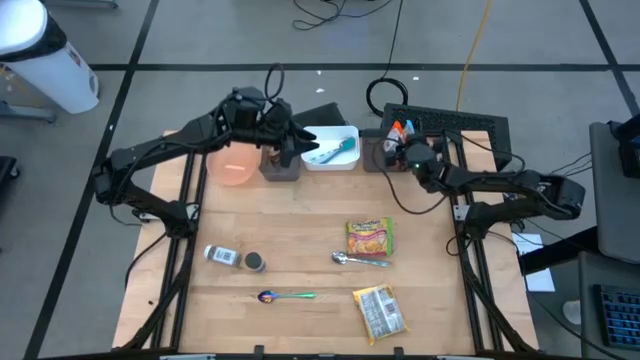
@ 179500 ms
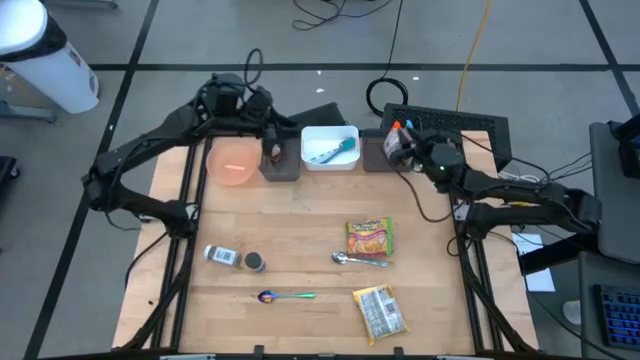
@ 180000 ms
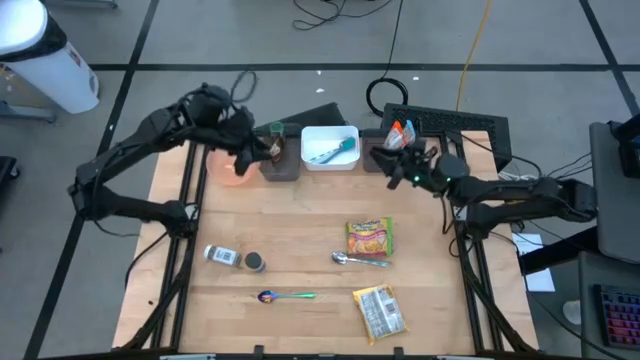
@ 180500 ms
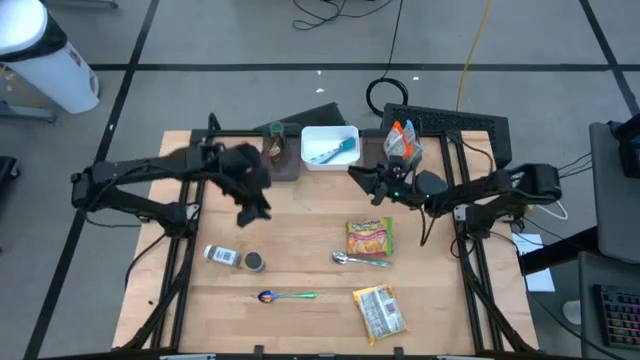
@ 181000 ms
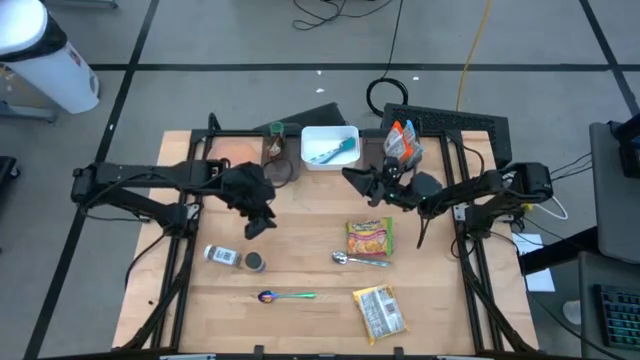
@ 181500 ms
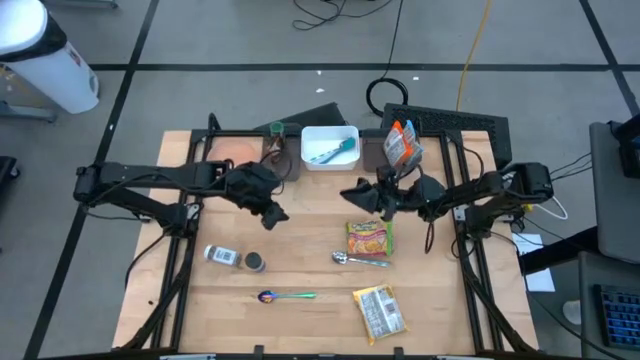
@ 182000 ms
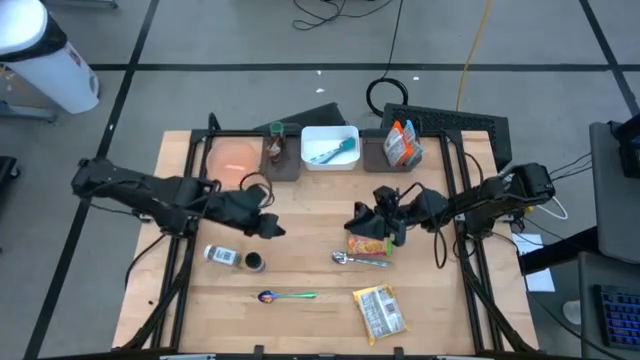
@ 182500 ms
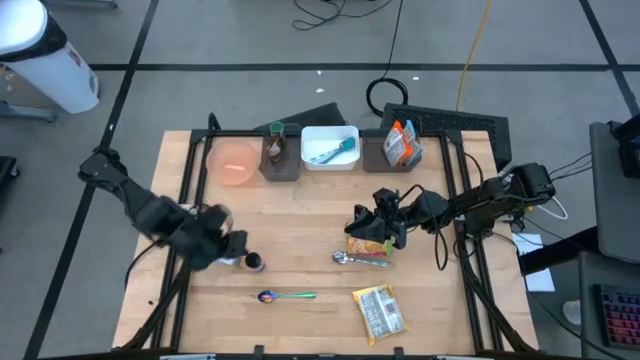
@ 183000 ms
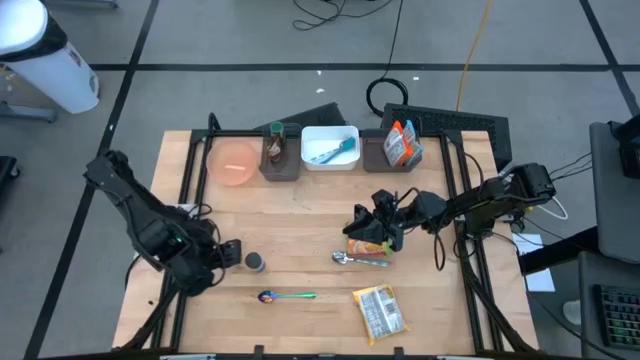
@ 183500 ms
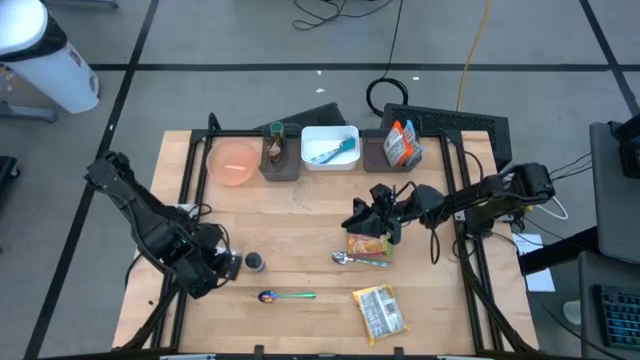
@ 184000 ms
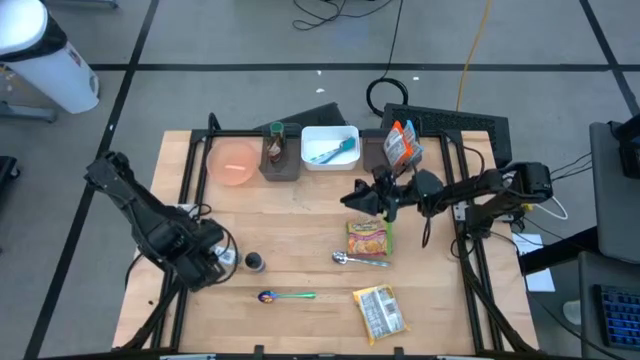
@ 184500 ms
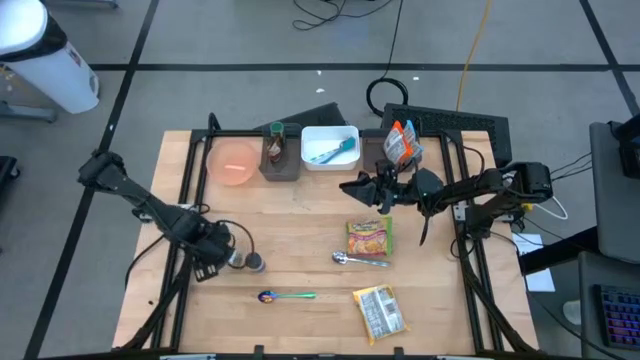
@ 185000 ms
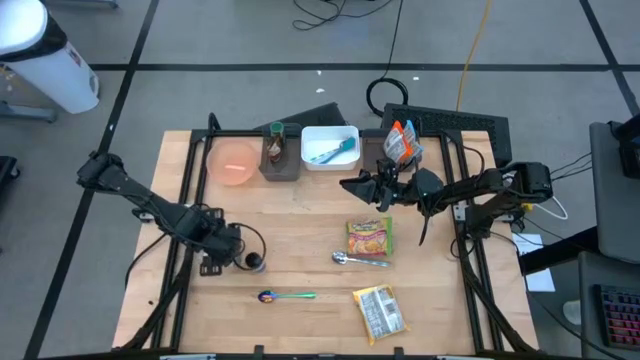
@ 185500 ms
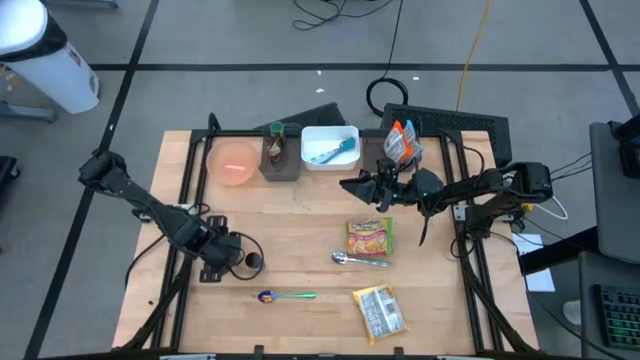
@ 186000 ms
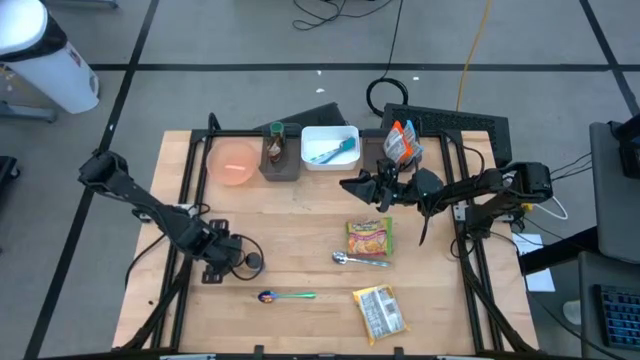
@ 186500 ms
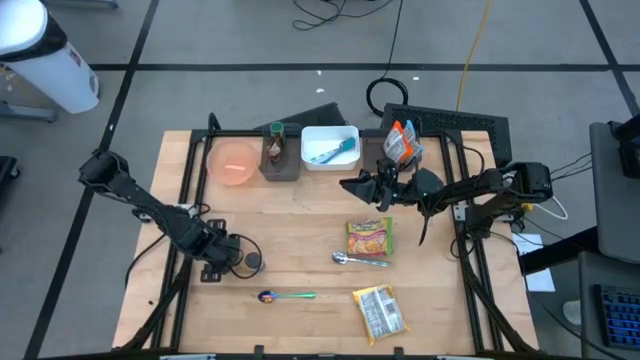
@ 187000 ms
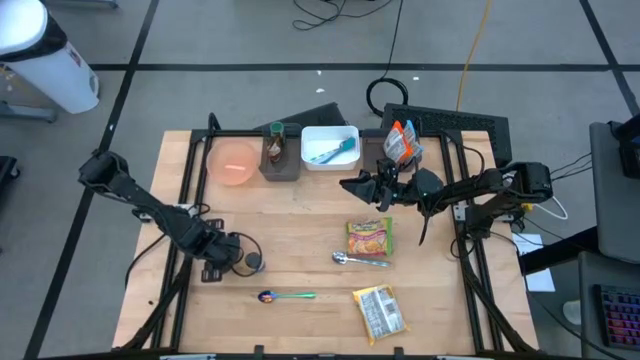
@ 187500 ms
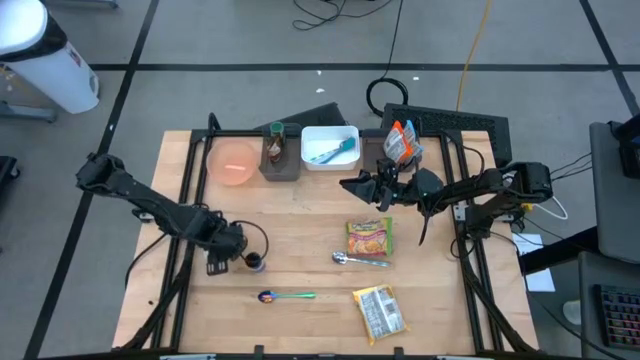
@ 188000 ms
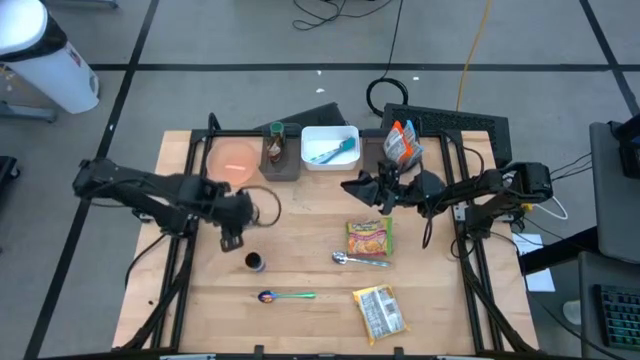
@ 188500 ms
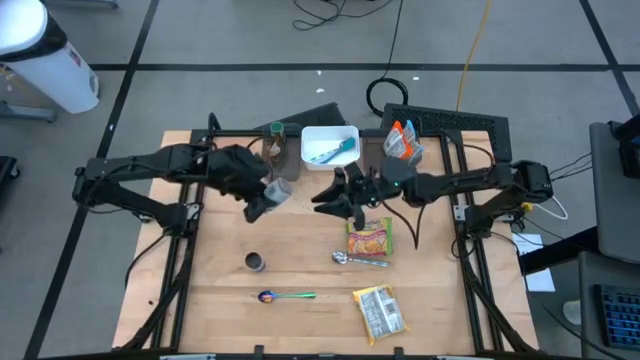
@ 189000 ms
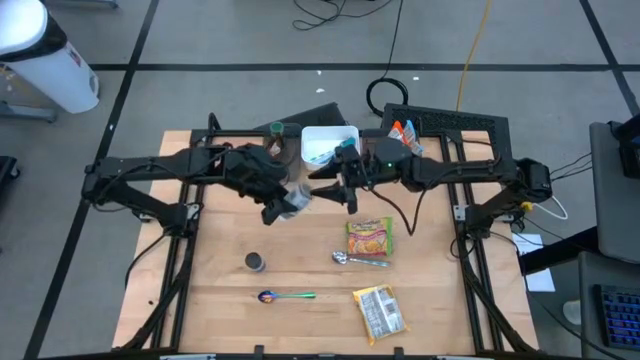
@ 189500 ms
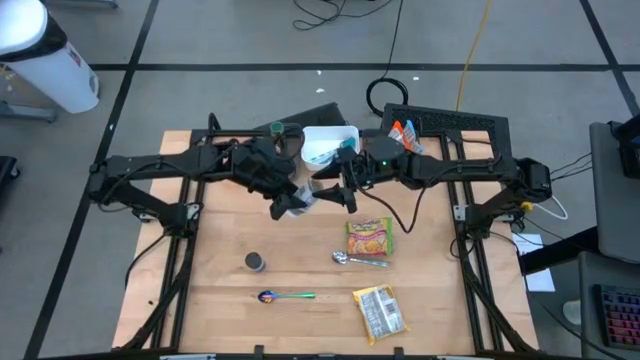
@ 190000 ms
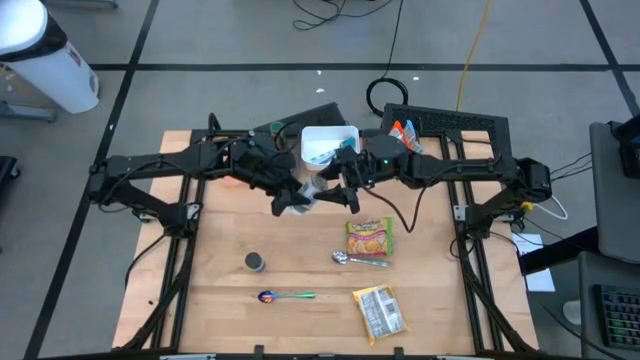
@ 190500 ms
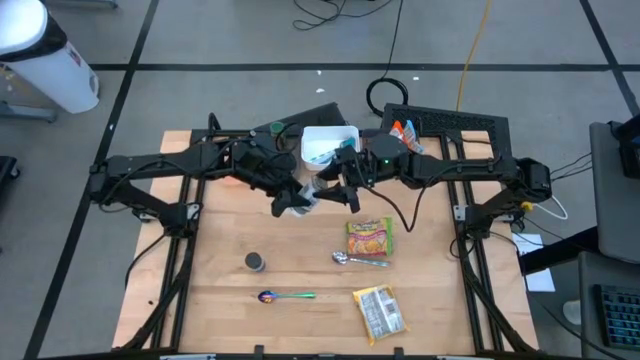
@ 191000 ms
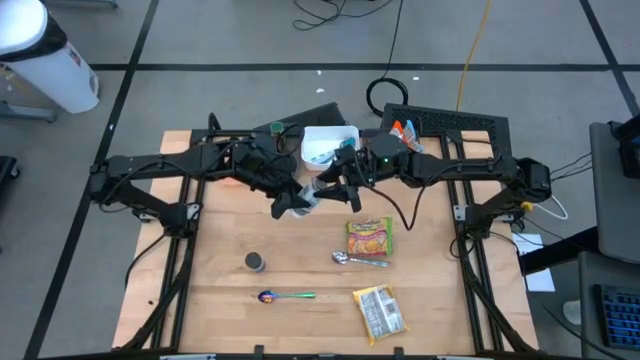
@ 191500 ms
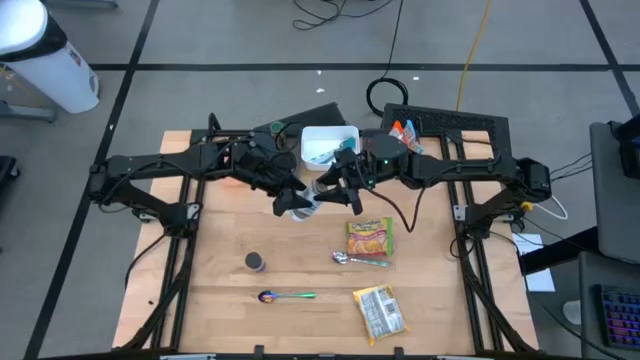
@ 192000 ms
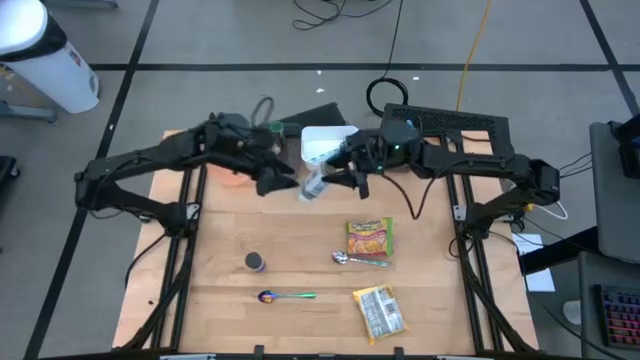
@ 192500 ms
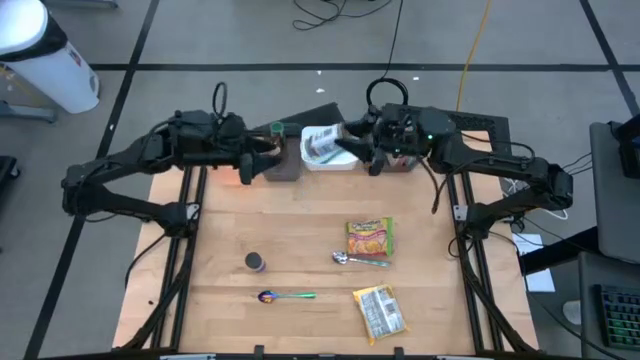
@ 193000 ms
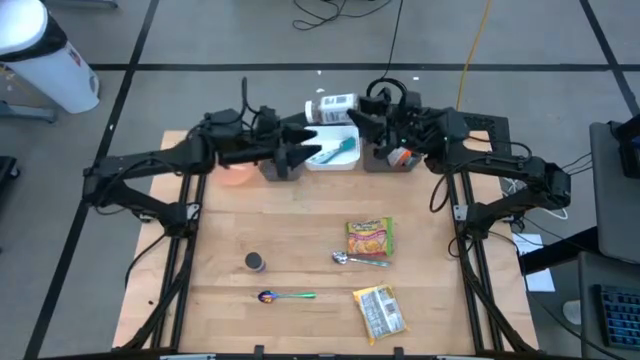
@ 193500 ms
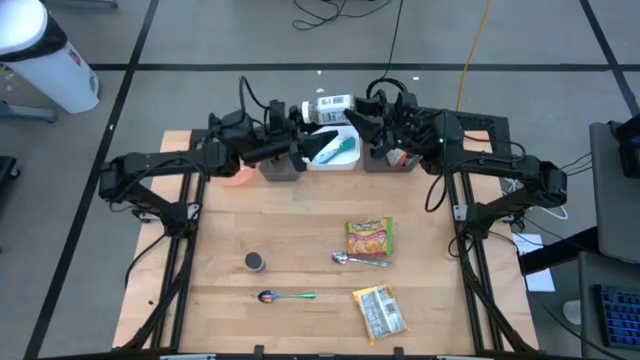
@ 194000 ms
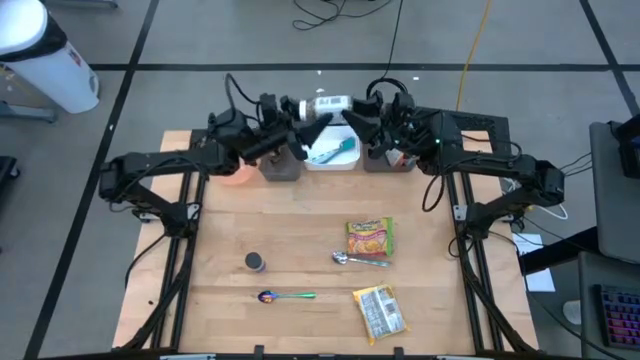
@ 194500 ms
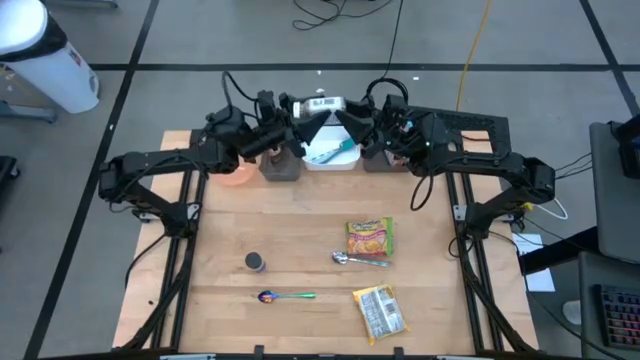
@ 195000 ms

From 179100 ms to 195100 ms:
Task: Pick & Place Food Item
Put the white seasoning bottle into the left black bin

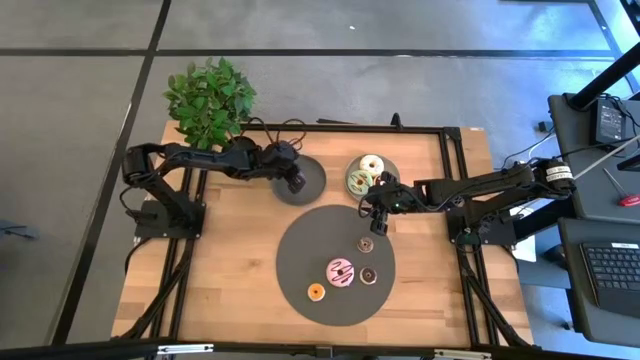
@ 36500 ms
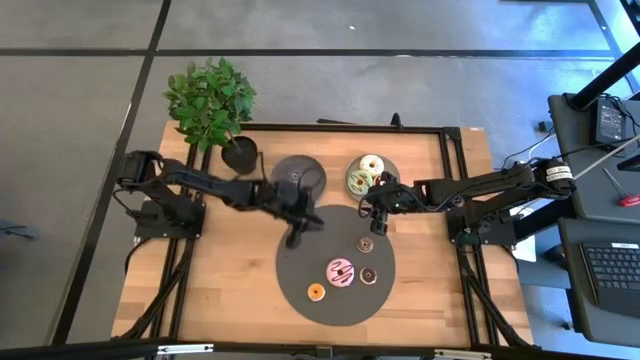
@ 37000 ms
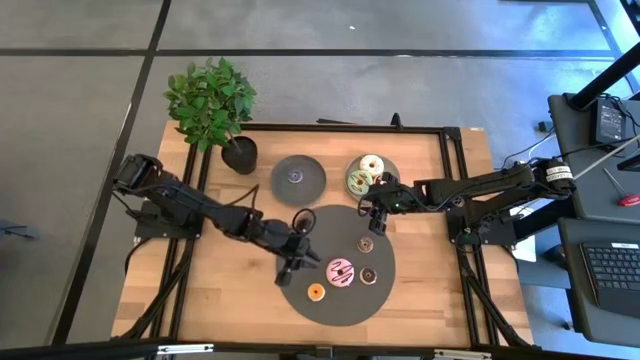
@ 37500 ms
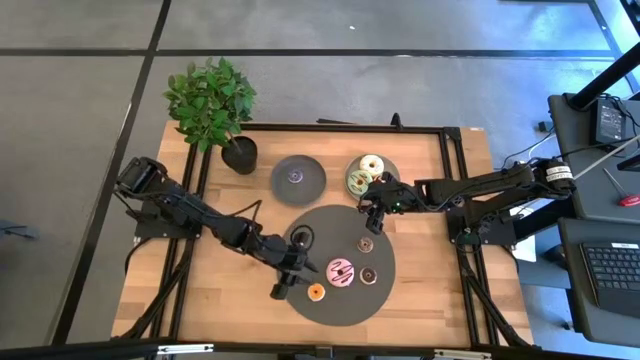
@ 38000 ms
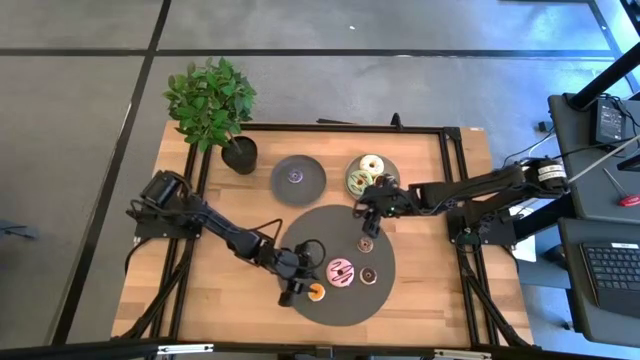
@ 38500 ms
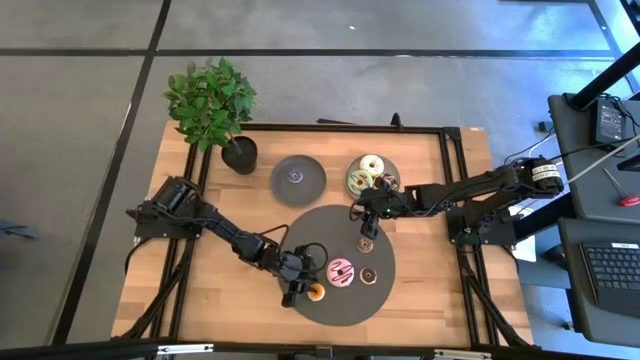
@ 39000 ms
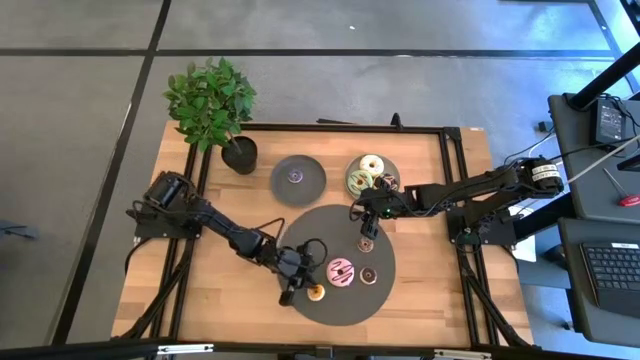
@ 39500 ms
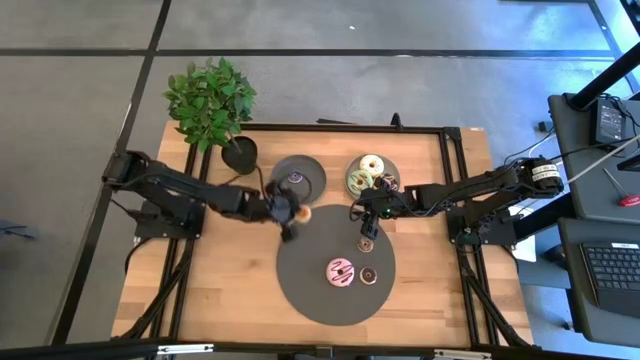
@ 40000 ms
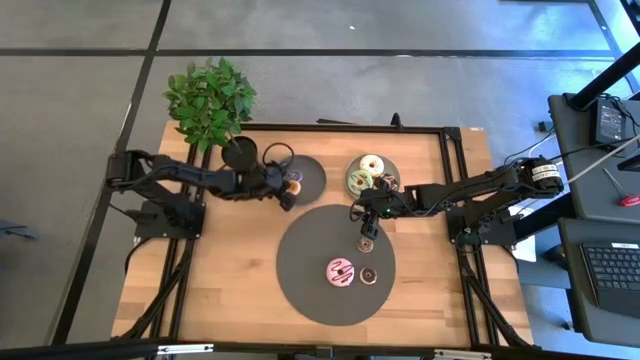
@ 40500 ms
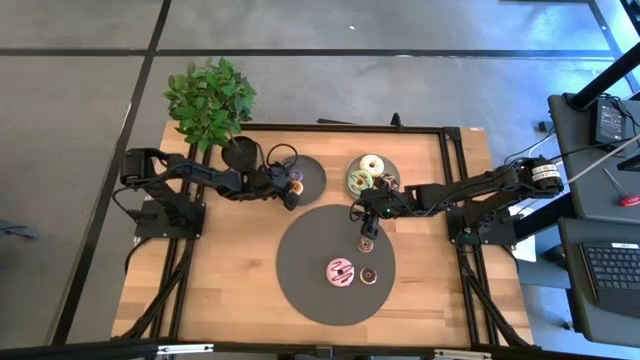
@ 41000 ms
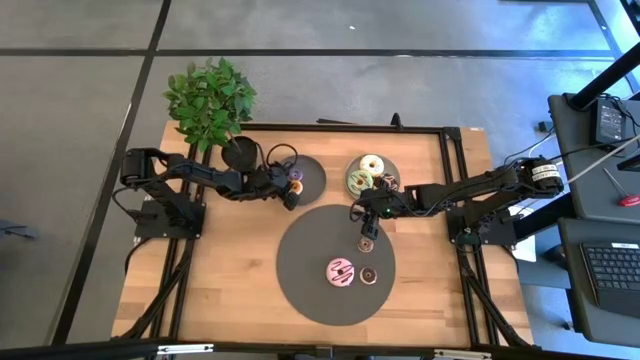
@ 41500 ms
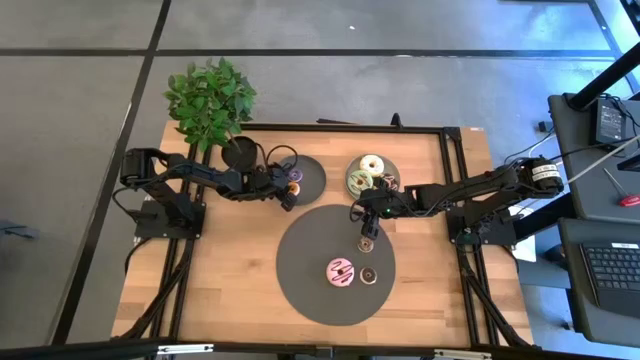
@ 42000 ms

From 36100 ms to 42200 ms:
Task: Pick & Place donuts
Put the small orange donut on the dark gray plate
